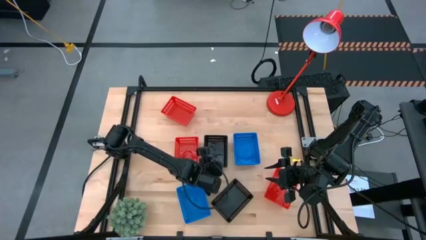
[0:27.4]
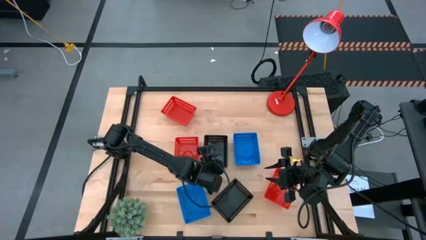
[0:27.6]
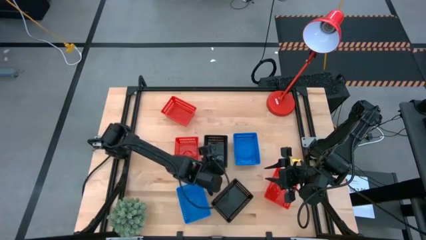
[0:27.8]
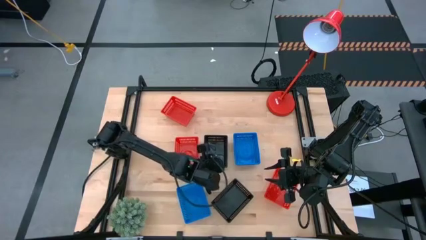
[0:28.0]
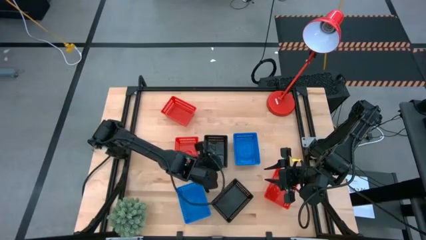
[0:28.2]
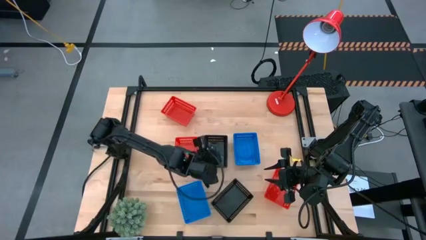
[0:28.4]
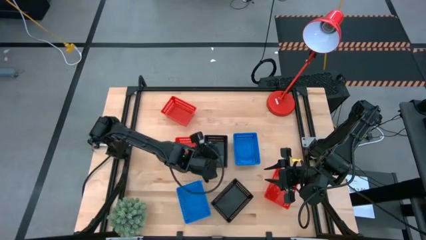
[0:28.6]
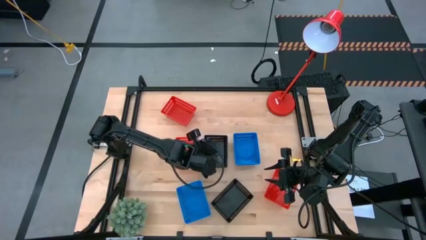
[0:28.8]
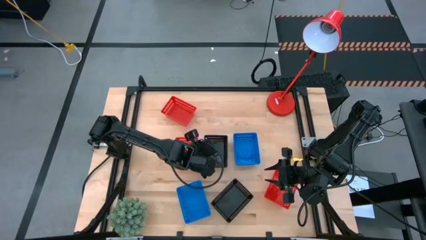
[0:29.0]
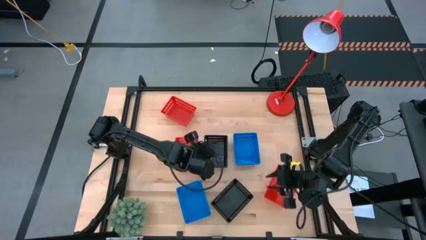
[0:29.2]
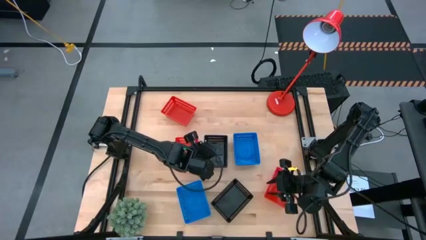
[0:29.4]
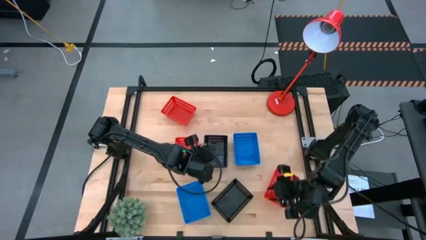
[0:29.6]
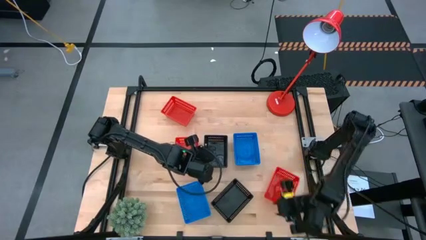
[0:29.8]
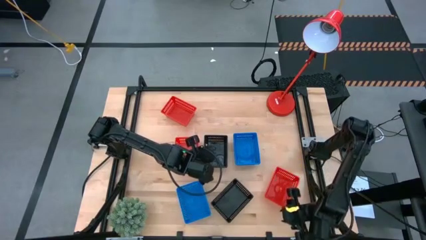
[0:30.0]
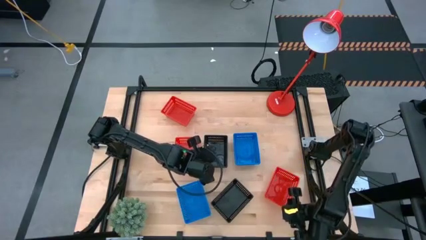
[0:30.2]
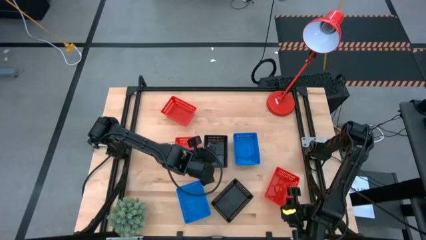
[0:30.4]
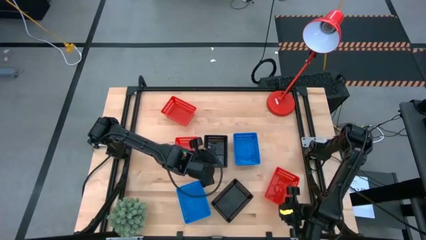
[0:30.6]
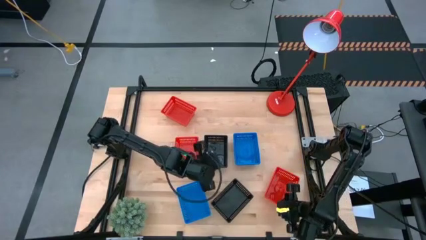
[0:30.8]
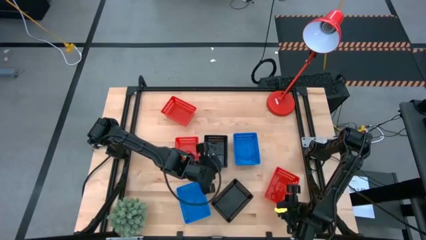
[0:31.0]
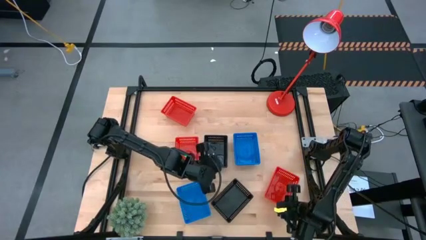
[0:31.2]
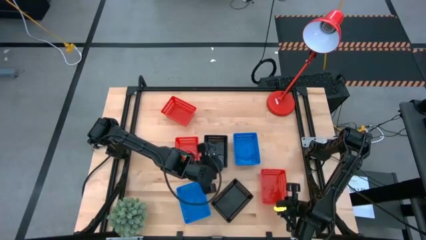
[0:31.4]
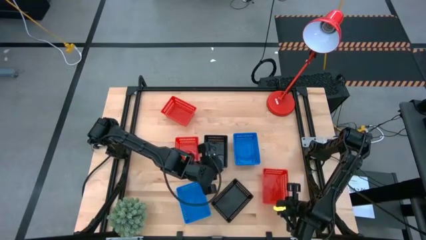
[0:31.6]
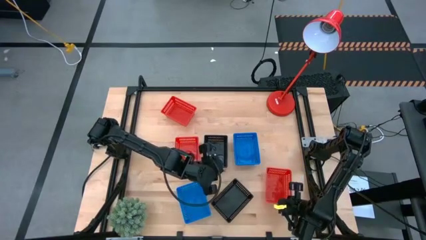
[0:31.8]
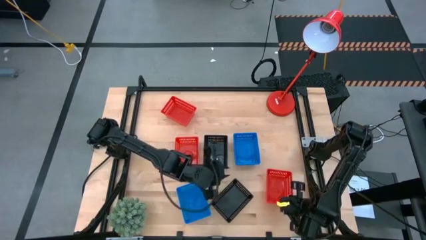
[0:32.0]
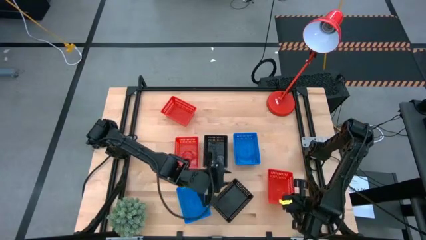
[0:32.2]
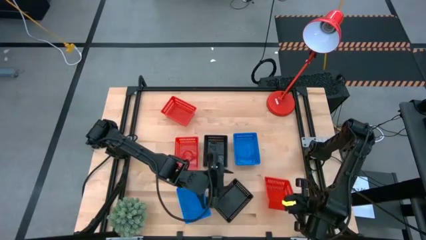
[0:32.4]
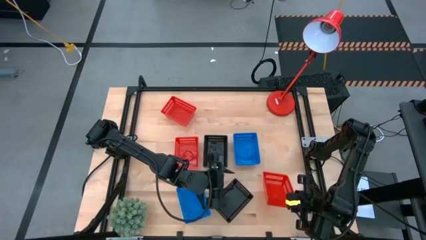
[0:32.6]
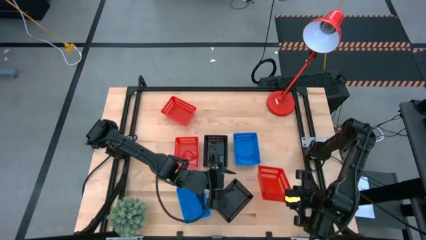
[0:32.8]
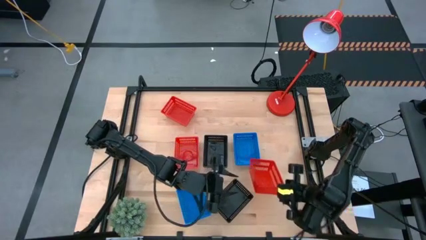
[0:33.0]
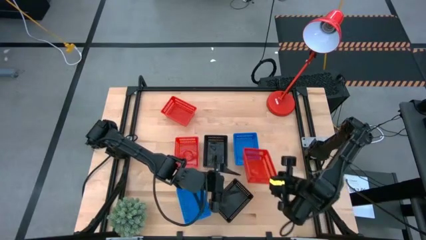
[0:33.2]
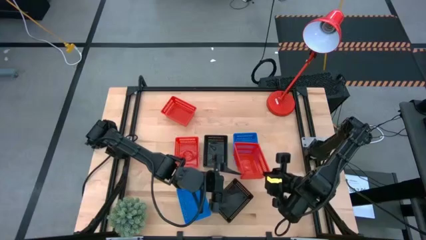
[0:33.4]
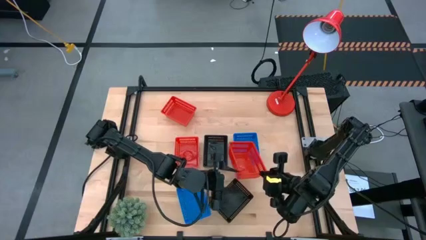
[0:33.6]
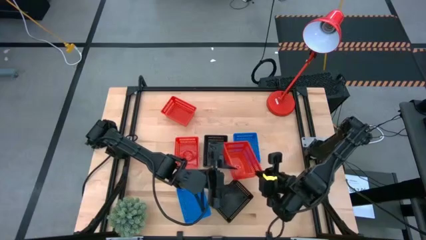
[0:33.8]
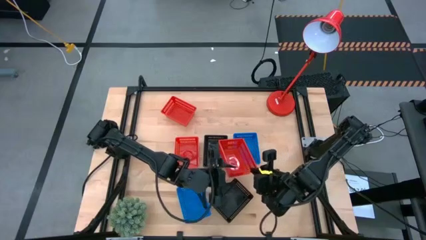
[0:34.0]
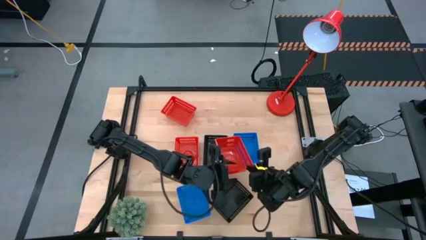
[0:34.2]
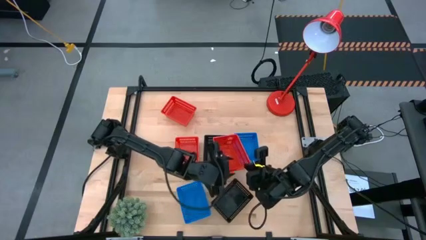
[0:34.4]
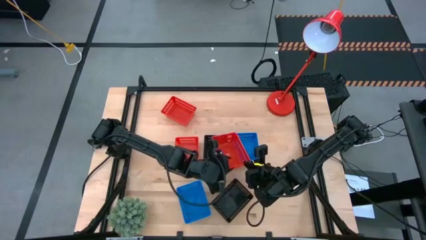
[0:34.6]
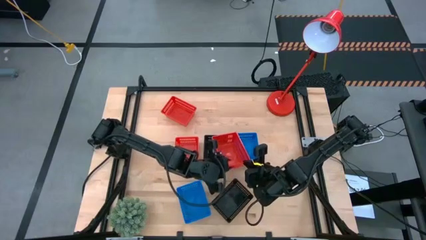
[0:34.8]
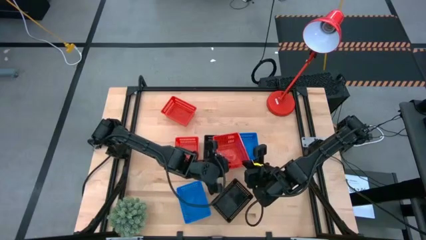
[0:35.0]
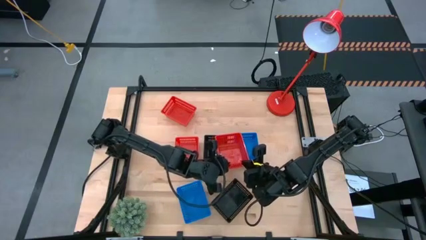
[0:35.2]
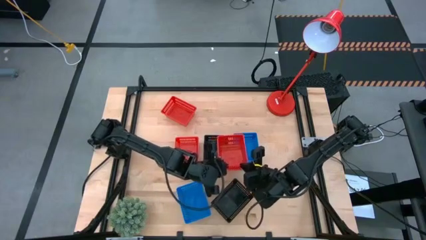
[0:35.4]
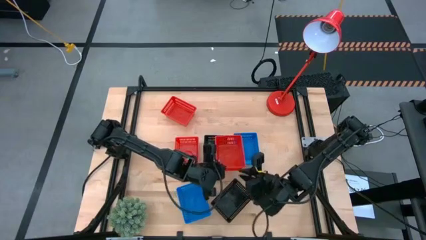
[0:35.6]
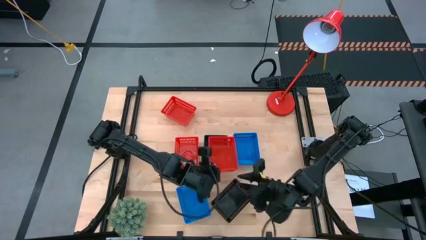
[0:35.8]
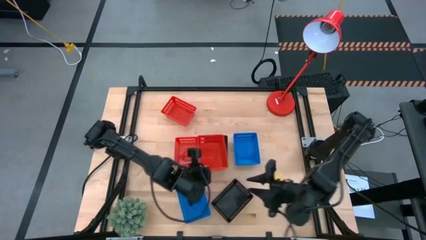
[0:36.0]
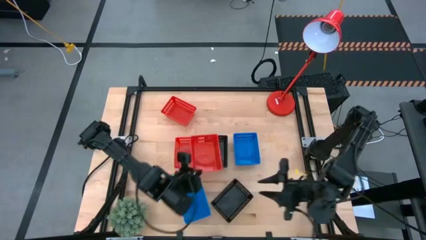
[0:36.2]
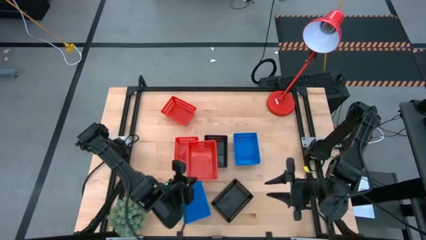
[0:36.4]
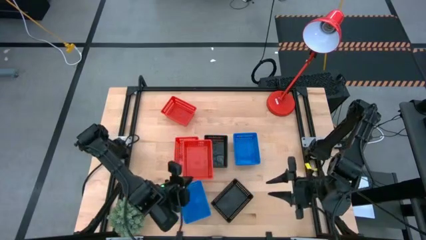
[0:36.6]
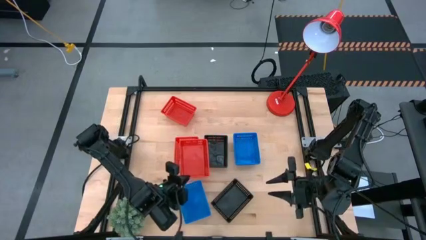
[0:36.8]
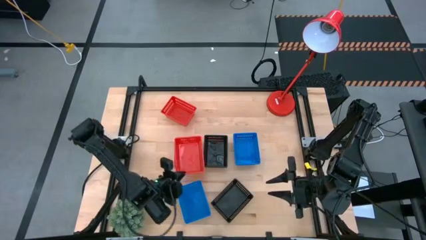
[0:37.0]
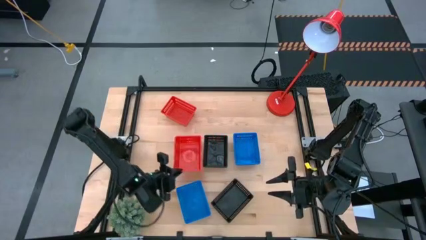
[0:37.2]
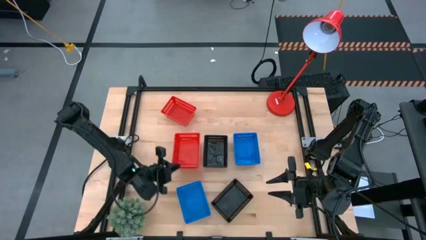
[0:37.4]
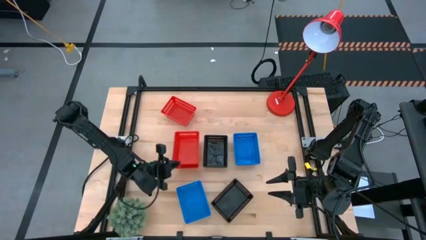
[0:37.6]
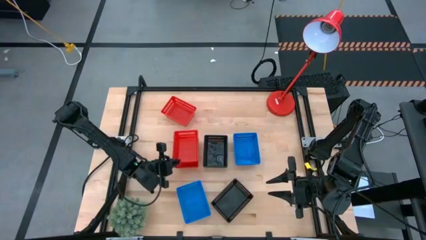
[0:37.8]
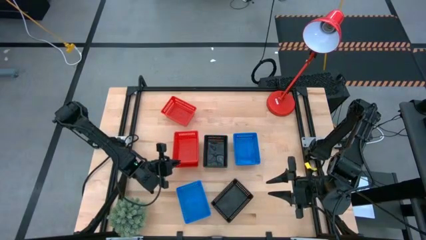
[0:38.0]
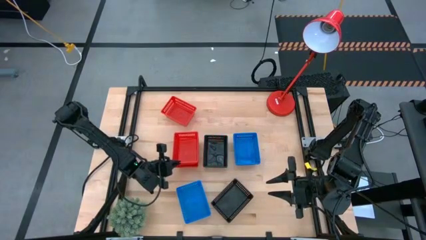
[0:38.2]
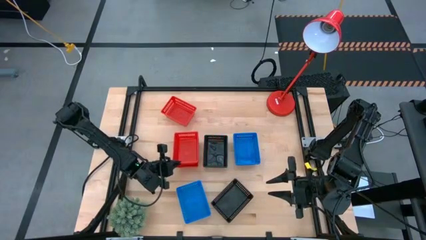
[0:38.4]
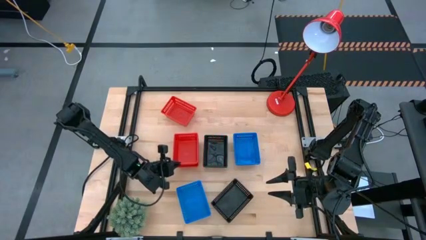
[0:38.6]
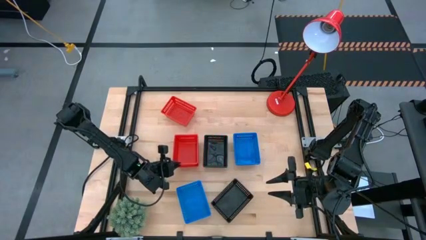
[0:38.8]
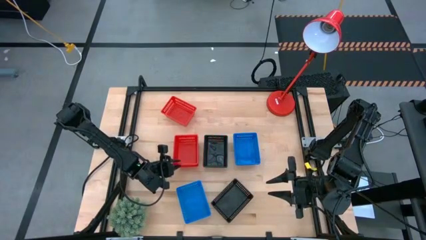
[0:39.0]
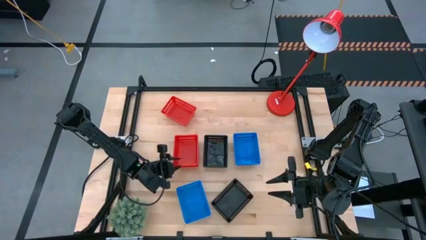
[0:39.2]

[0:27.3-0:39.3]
Stack the bottom red bin on the middle red bin
